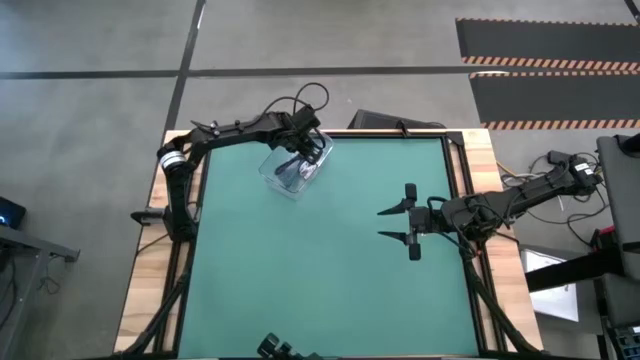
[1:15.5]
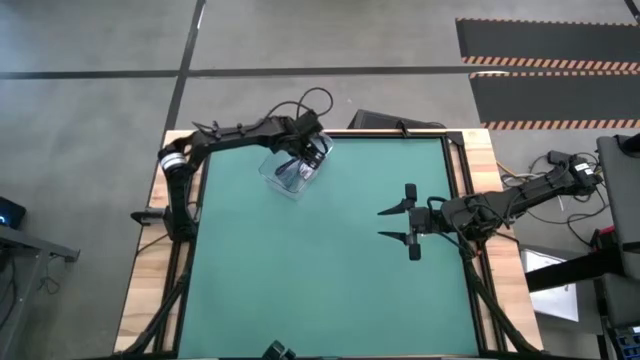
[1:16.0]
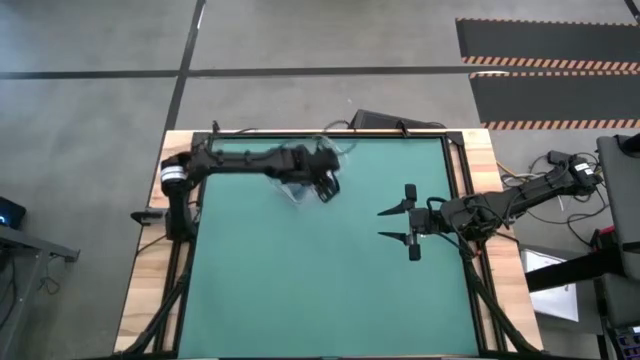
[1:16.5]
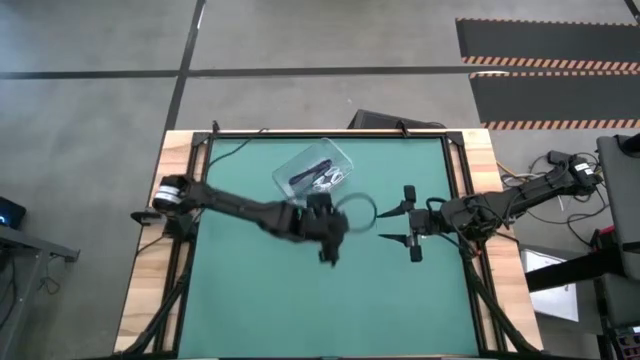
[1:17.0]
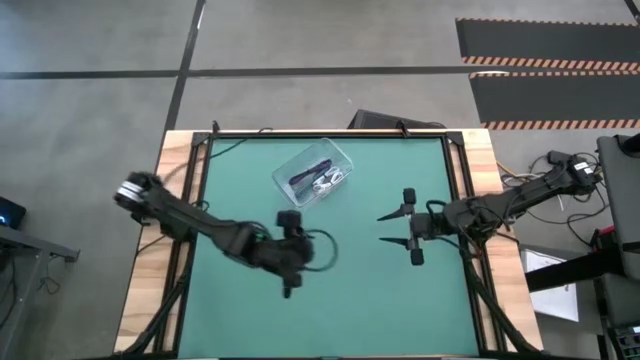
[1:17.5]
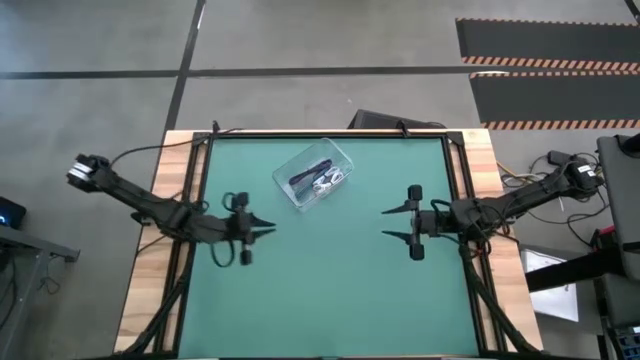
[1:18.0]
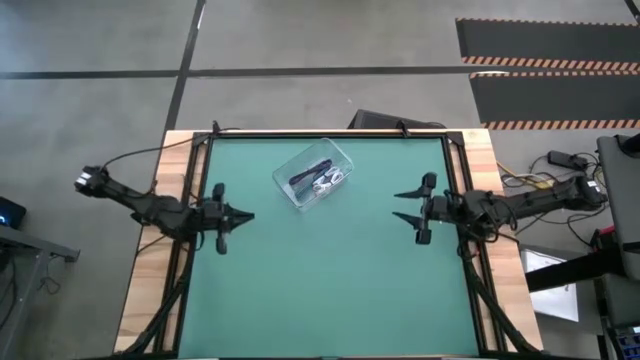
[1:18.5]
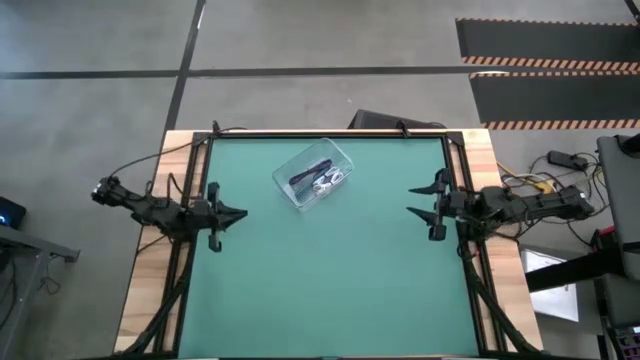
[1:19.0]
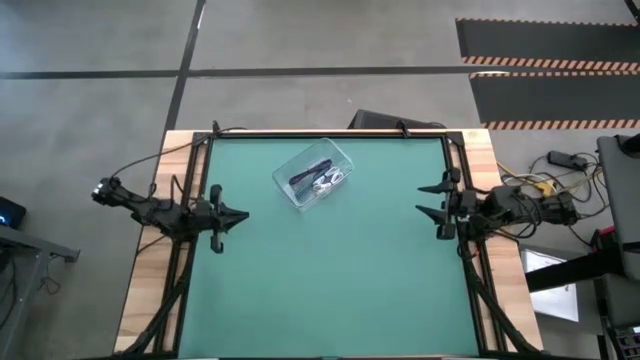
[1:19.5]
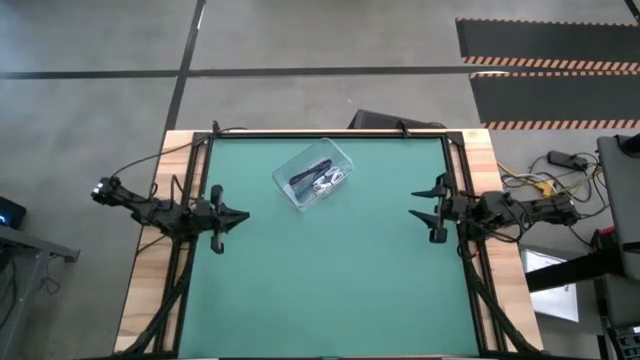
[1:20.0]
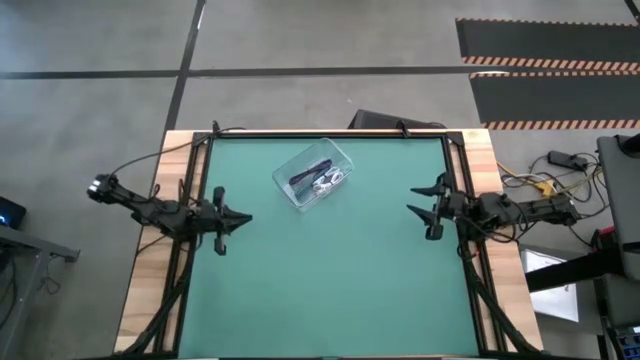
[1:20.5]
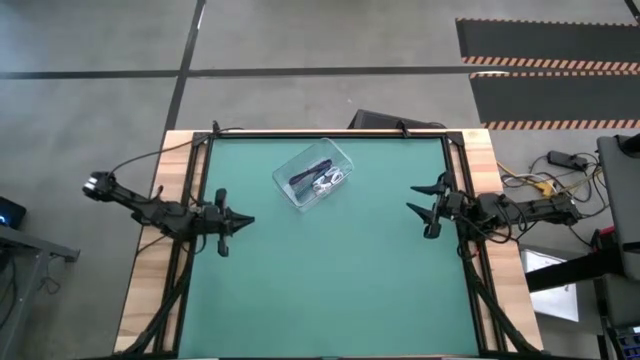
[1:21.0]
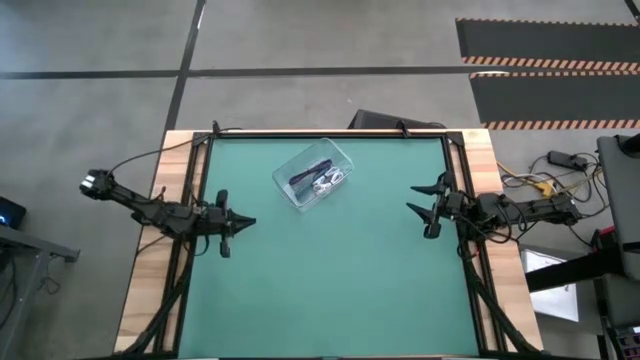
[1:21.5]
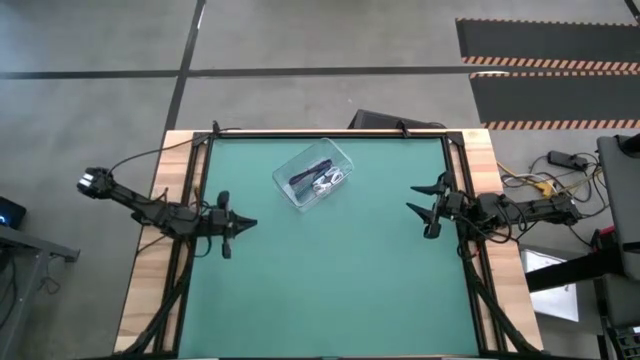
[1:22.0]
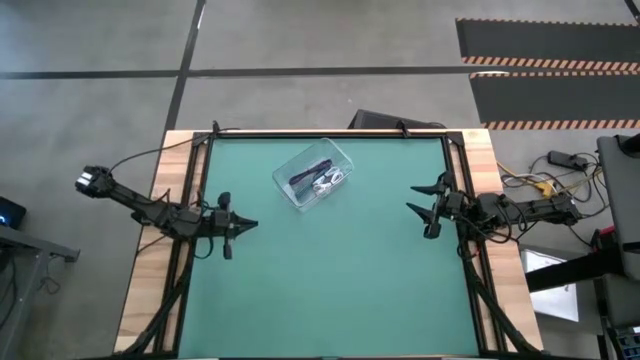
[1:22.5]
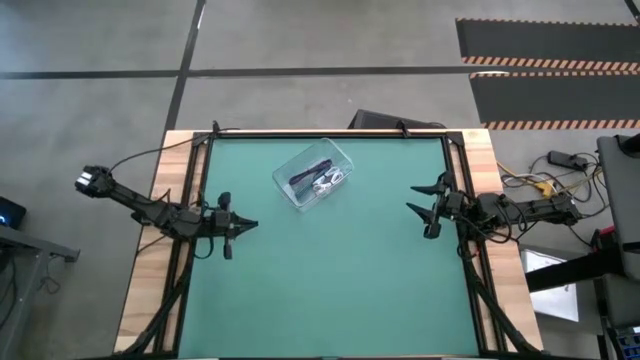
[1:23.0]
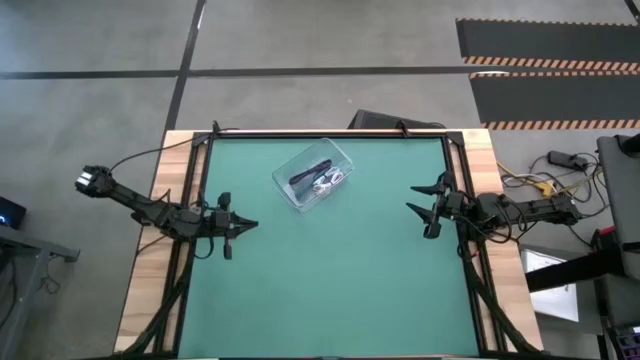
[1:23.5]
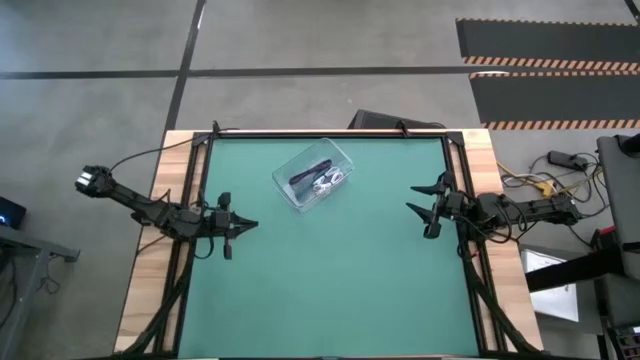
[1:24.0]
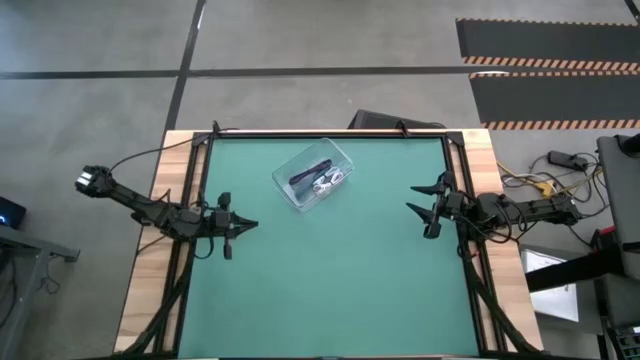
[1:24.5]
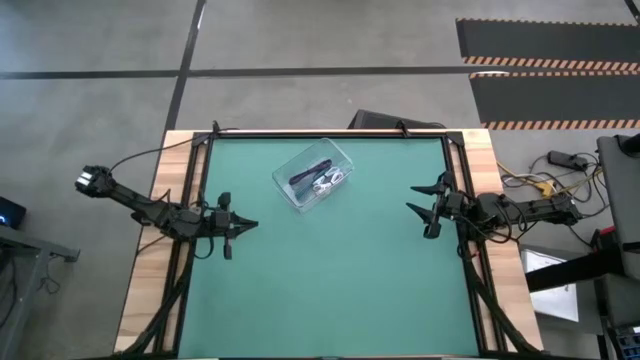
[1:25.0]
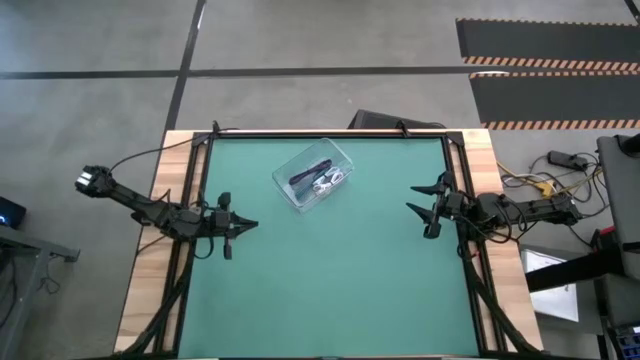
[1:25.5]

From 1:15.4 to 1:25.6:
Task: Pick and place USB-C Cables
Return to Home Position

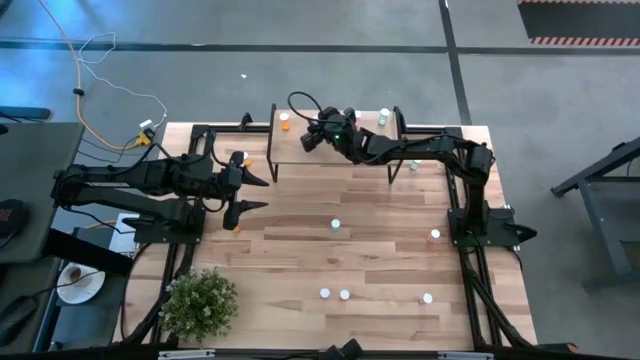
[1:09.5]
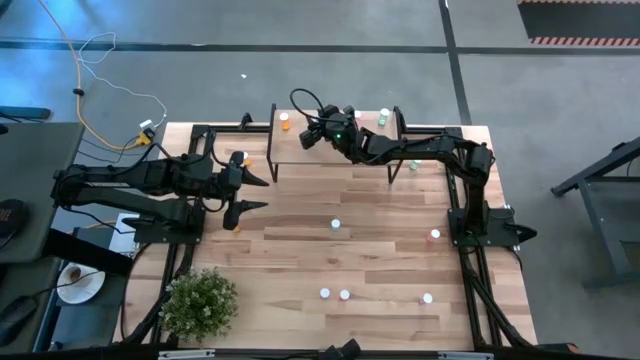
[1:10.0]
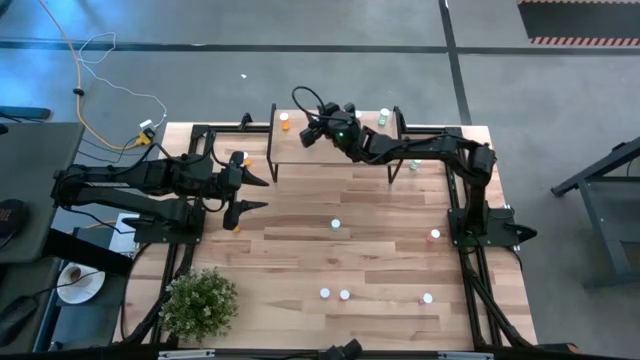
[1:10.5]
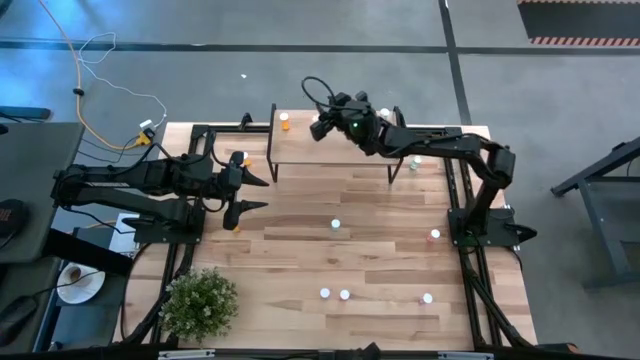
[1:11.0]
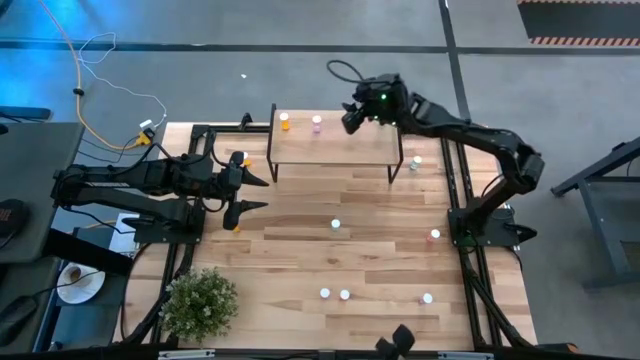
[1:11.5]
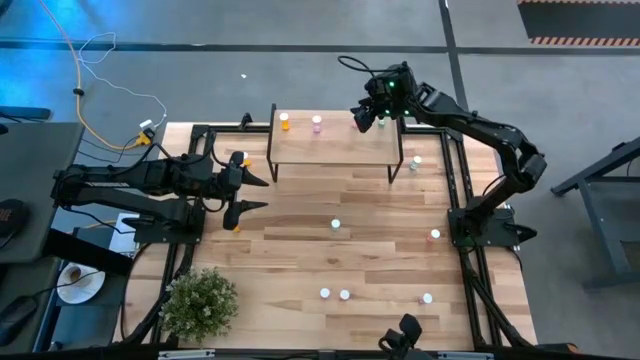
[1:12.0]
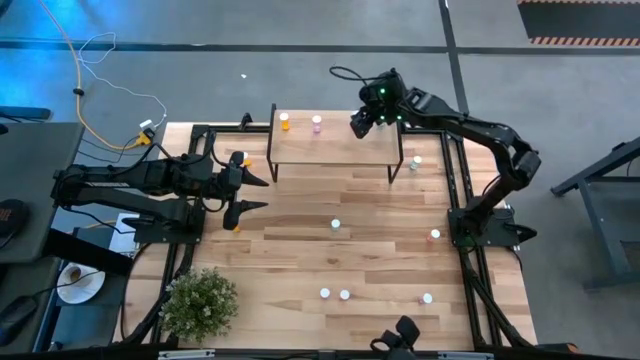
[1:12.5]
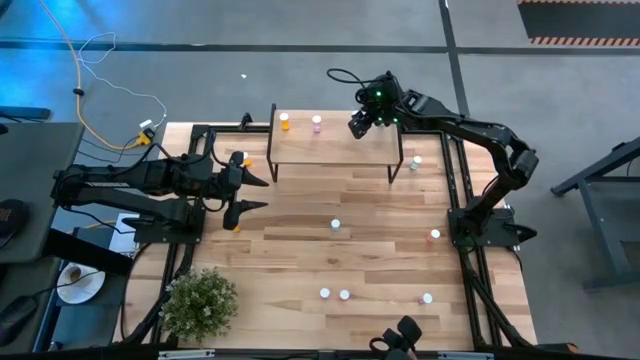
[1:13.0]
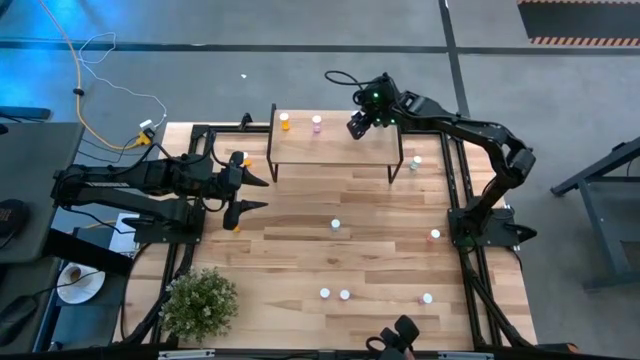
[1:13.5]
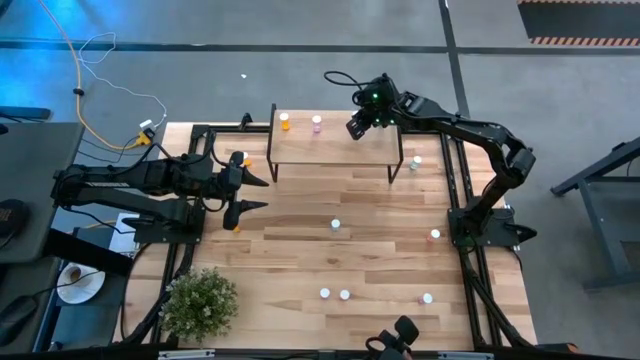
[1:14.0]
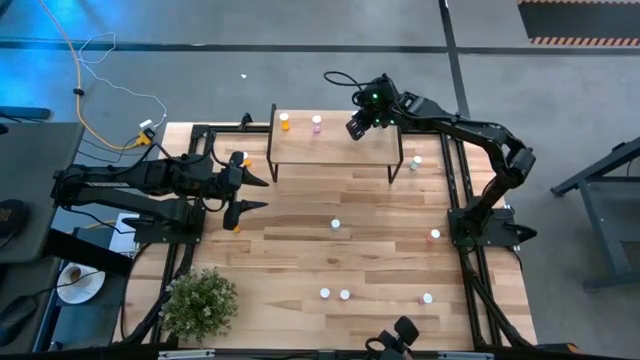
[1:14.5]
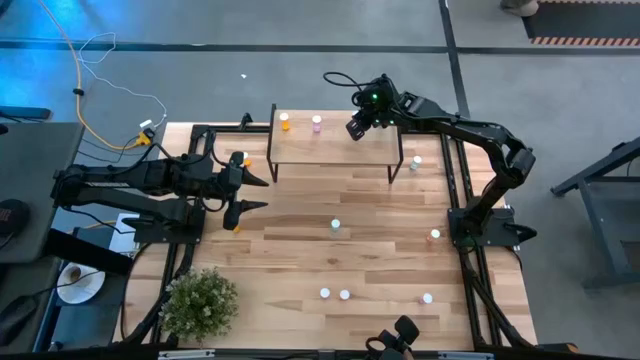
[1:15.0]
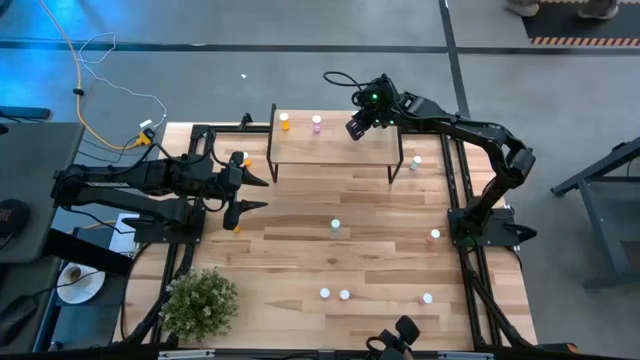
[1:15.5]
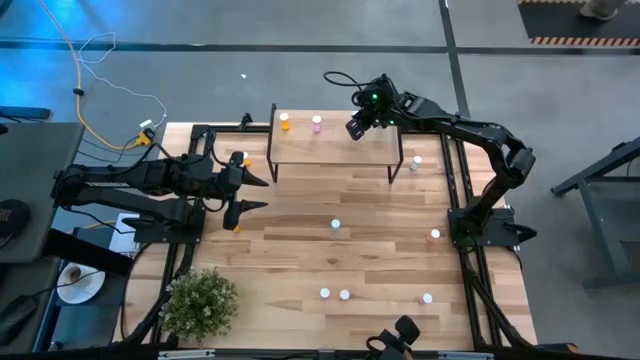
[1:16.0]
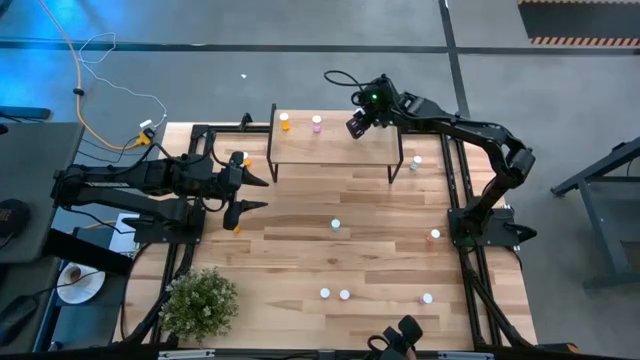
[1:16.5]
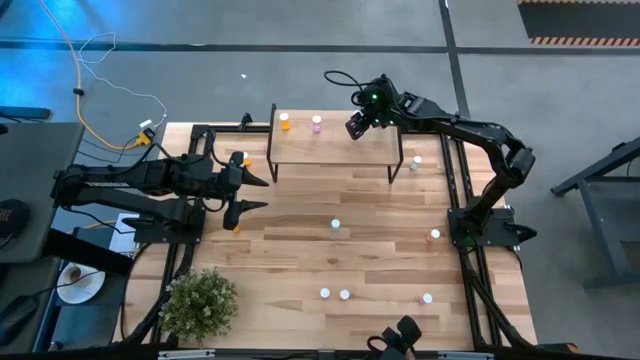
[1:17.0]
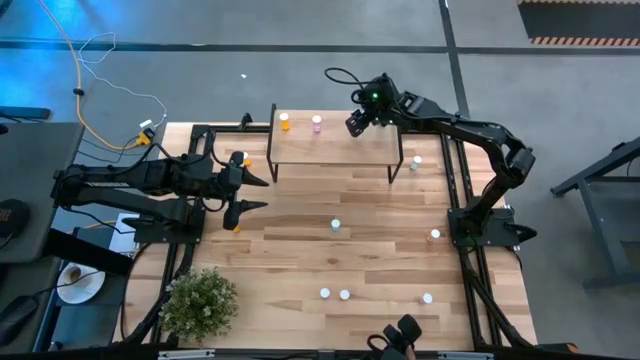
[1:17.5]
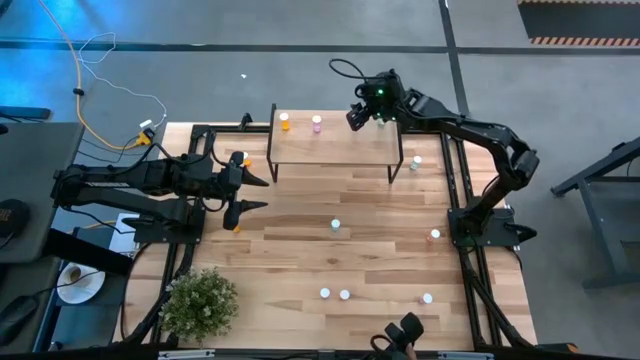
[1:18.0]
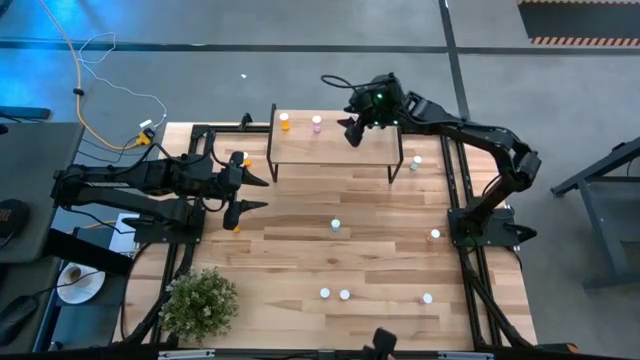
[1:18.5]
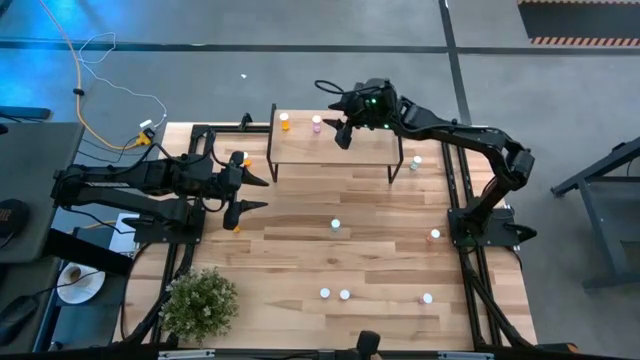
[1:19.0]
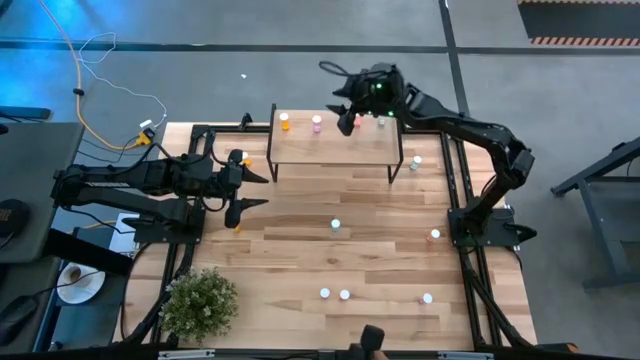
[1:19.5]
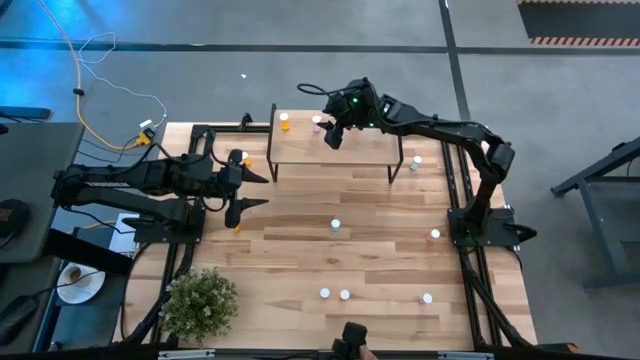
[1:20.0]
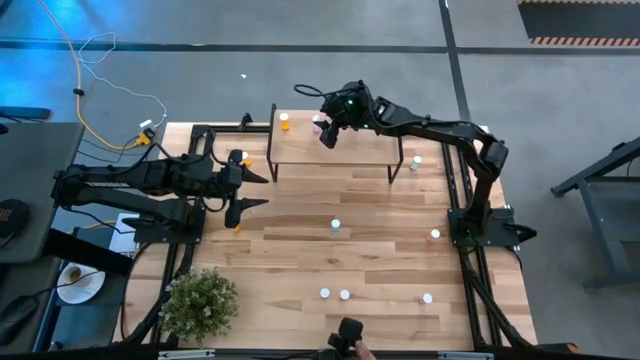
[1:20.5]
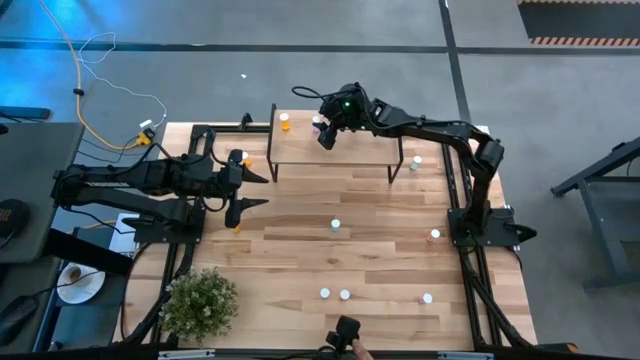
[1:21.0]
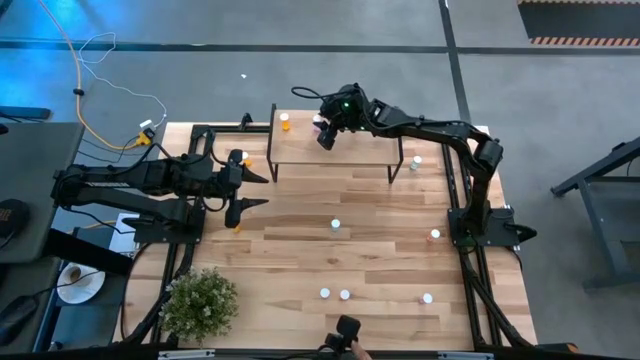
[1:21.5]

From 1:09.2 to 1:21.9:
Task: Pick and place medicine bottles onto shelf by color
Adjust the pill bottles on the shelf
